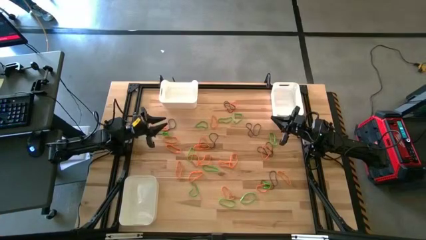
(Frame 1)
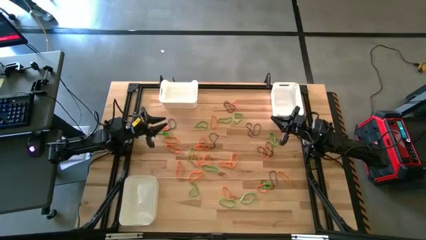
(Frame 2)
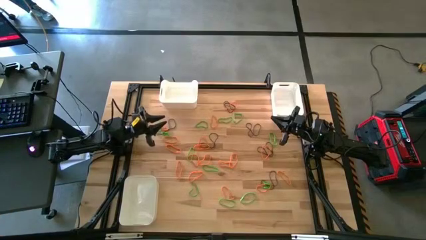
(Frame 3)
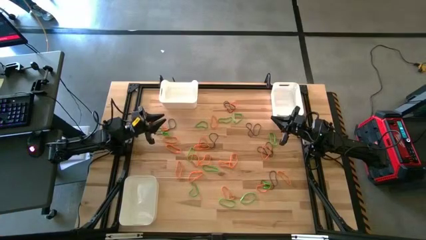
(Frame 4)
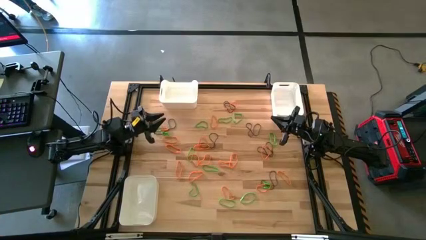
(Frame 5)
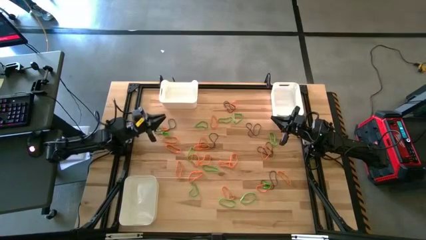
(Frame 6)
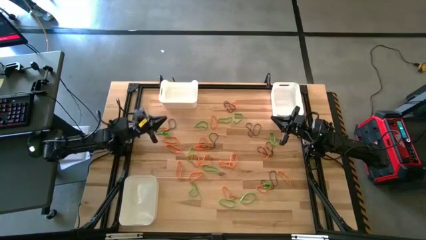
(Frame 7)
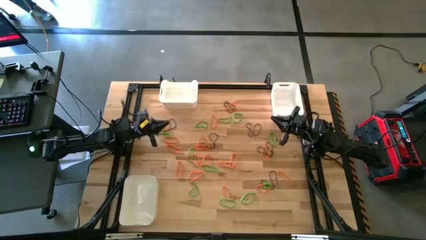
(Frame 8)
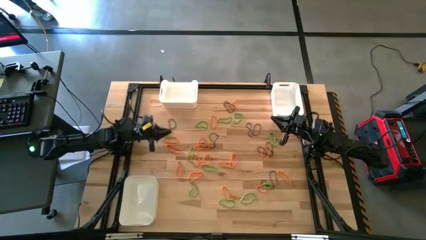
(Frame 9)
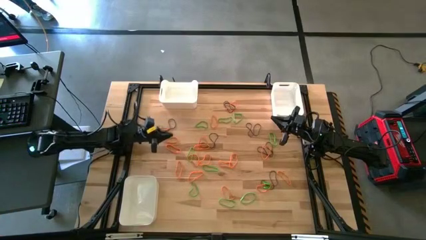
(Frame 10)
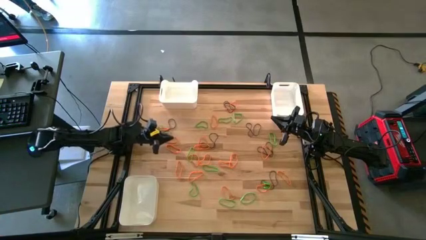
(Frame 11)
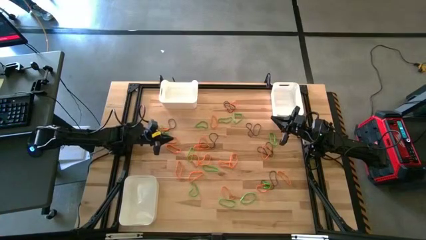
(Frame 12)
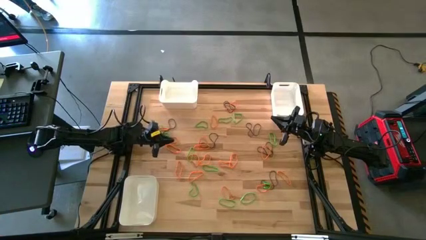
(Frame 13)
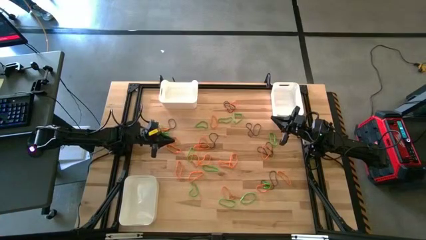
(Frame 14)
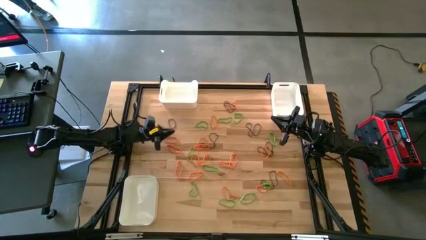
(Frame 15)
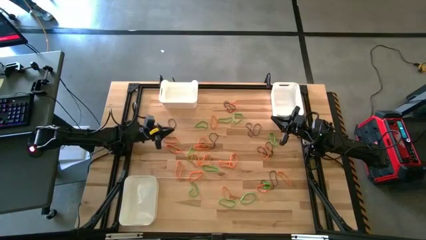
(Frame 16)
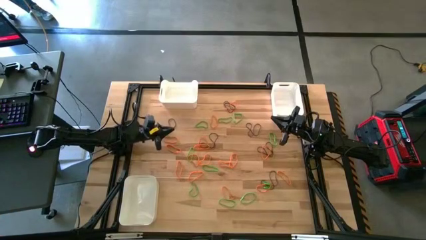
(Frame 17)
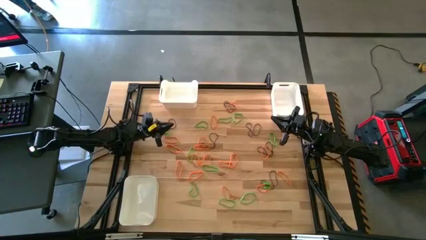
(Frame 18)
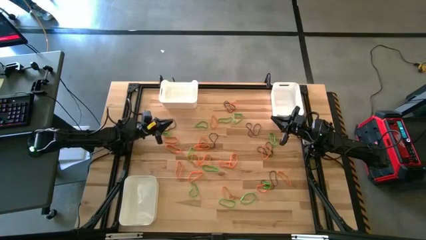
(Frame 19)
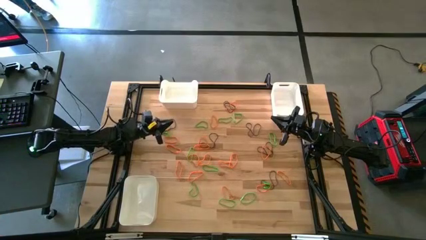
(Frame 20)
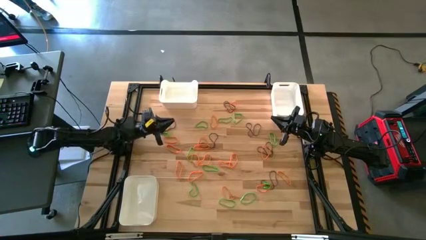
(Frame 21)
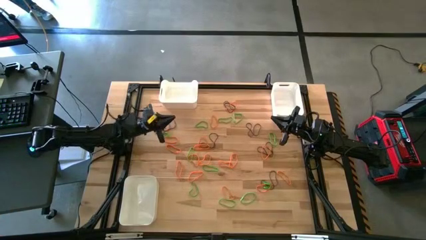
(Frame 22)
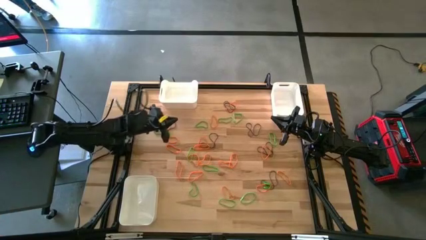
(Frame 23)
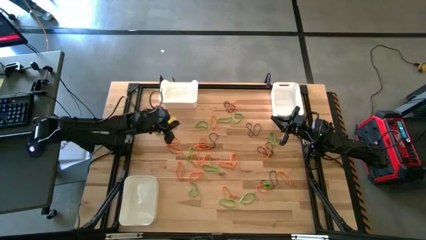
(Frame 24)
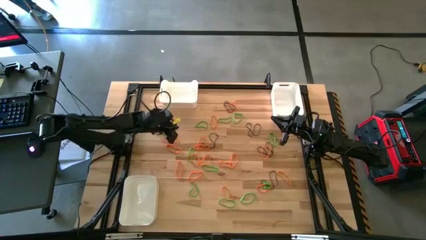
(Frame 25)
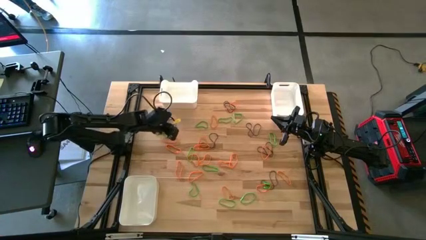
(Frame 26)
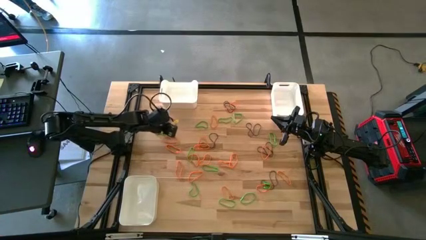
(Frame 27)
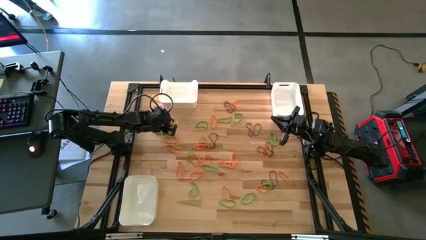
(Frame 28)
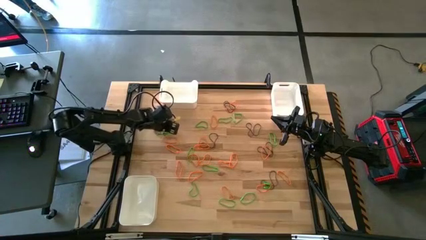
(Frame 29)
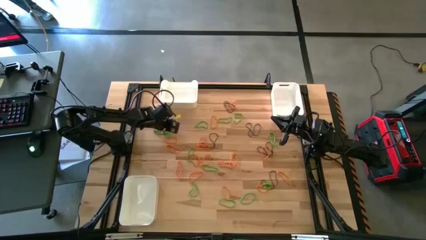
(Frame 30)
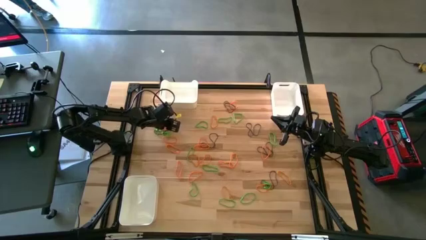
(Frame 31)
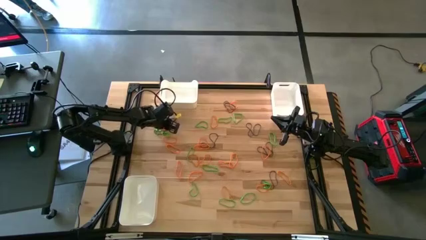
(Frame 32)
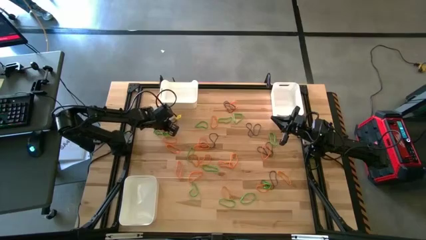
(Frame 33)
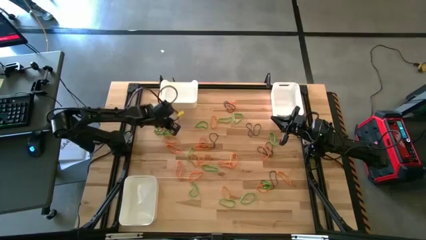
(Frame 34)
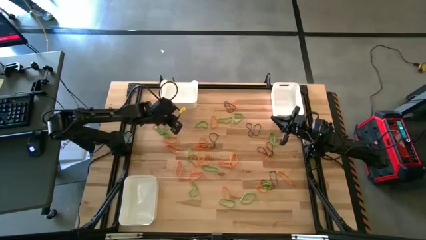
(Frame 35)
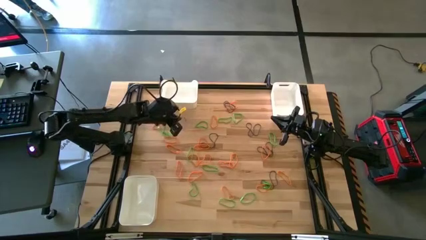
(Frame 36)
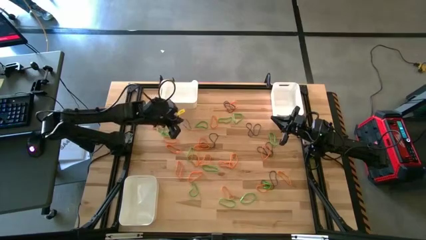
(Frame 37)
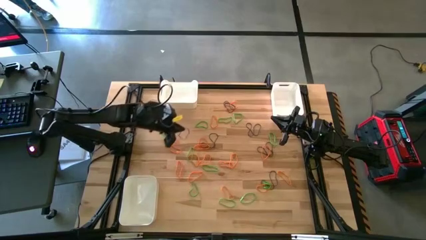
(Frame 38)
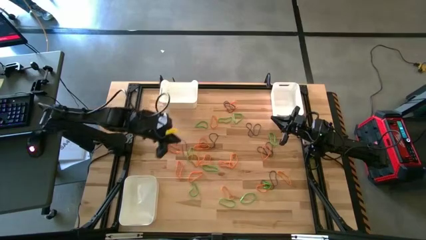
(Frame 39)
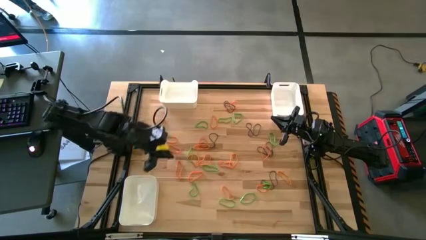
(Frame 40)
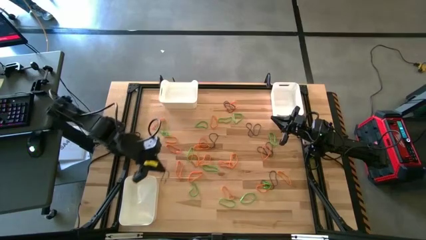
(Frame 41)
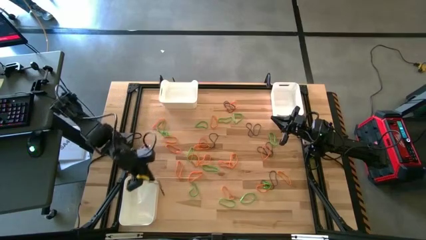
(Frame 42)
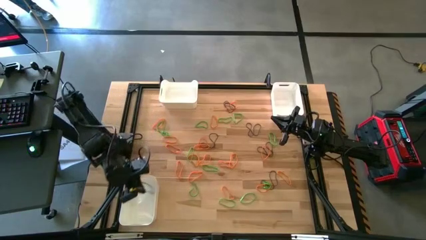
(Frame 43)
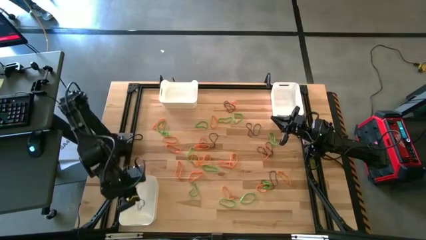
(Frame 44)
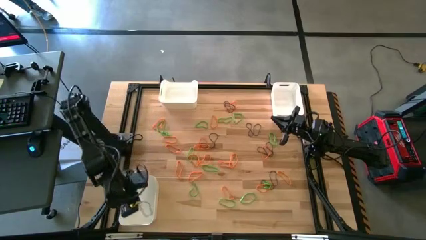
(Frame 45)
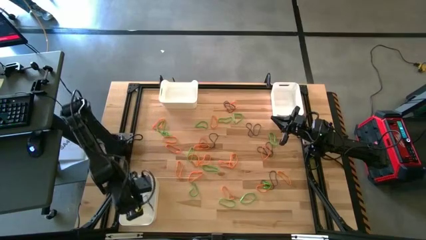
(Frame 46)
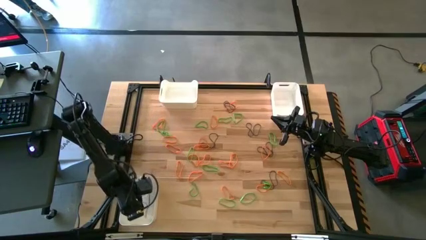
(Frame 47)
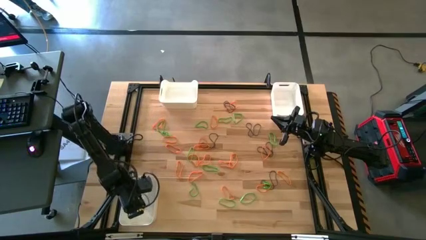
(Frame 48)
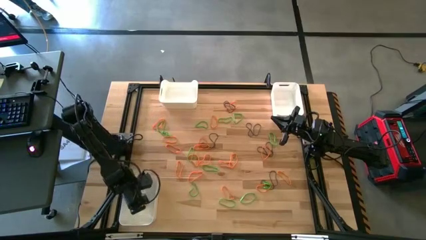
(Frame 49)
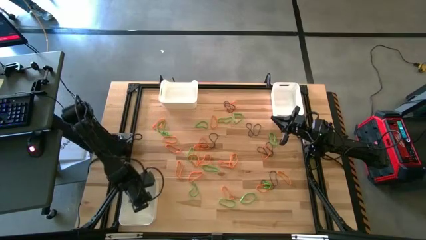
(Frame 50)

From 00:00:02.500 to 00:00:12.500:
Task: Sort rubber bands into baskets
Put the purple rubber band into the bottom left white bin

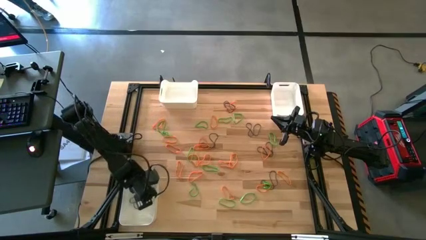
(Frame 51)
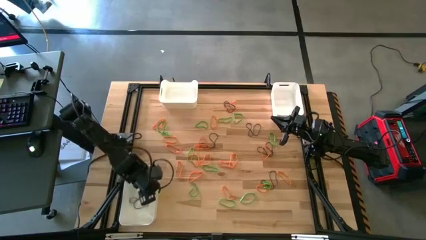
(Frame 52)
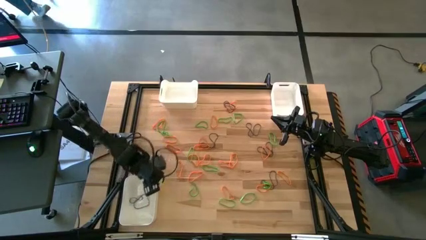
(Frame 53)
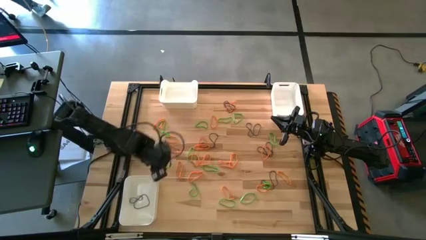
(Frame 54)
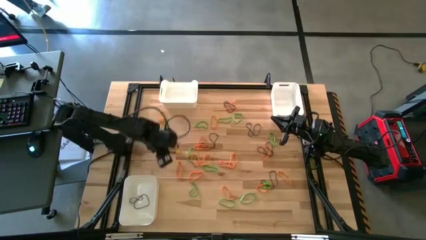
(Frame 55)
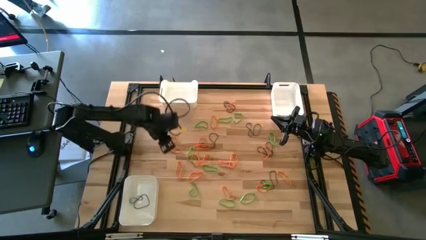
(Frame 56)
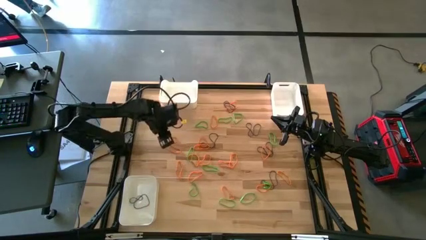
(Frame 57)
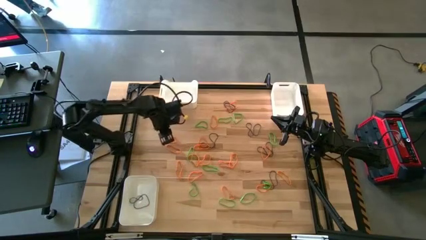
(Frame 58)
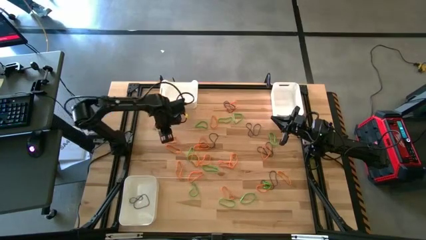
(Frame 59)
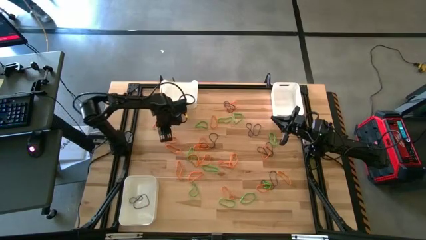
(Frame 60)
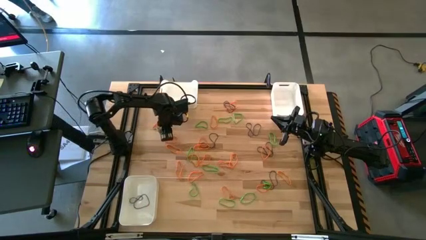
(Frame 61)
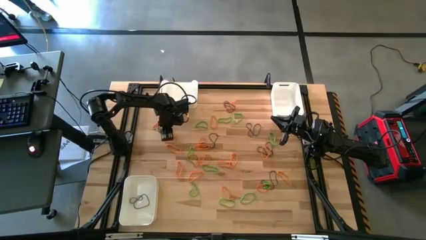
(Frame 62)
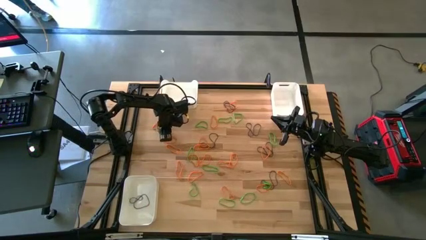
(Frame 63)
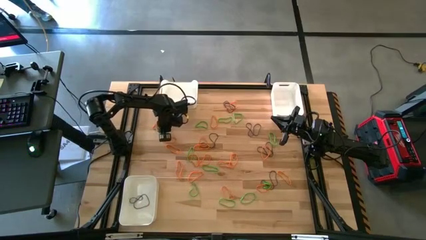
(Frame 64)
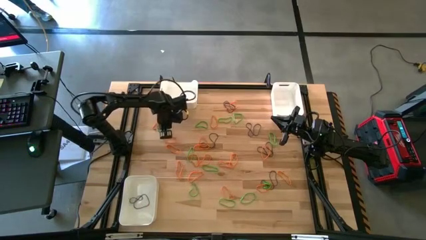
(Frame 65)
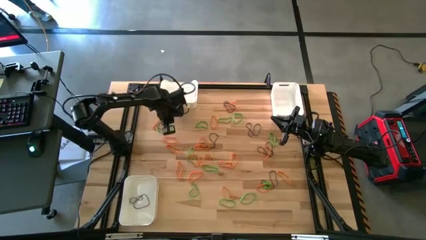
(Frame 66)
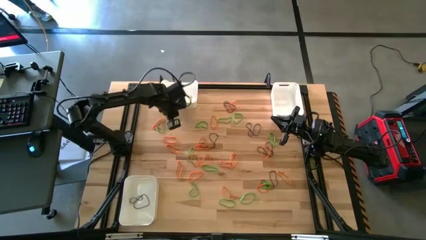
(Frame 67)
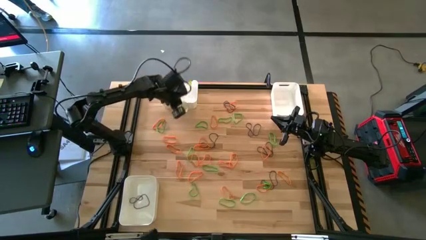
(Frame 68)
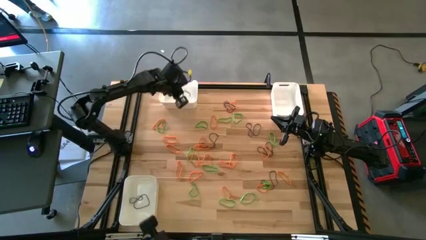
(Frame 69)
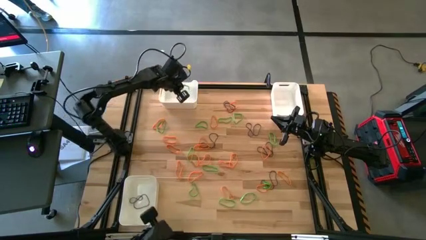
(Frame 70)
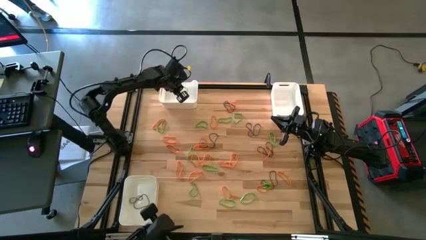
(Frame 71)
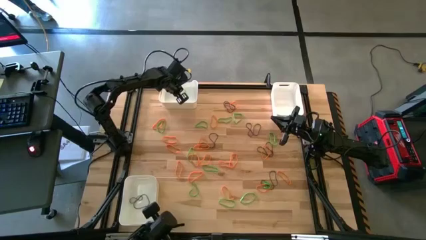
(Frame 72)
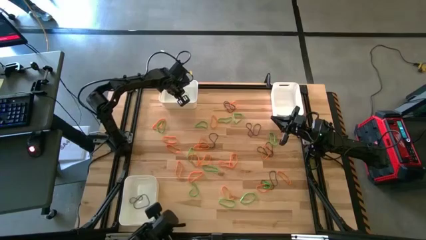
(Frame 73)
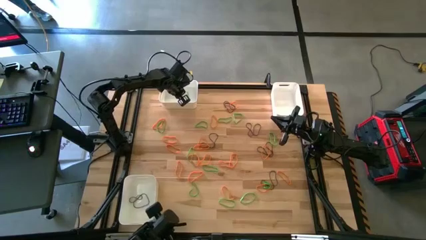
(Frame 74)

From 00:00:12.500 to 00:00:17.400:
Put the green rubber band into the top left white bin
